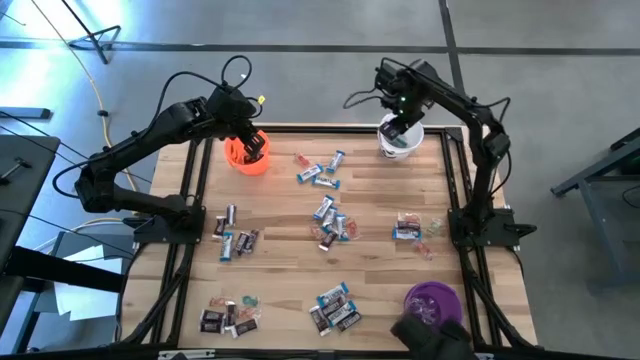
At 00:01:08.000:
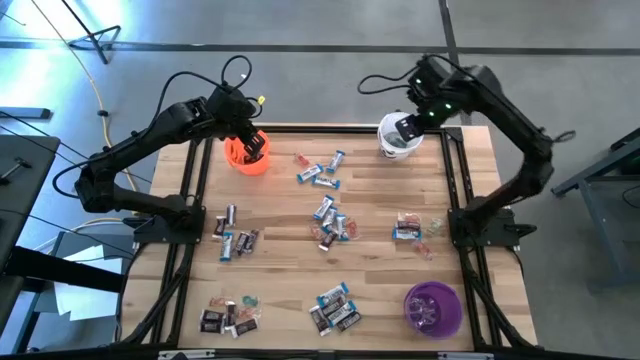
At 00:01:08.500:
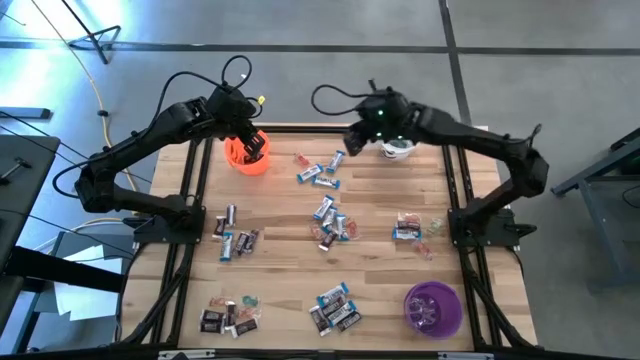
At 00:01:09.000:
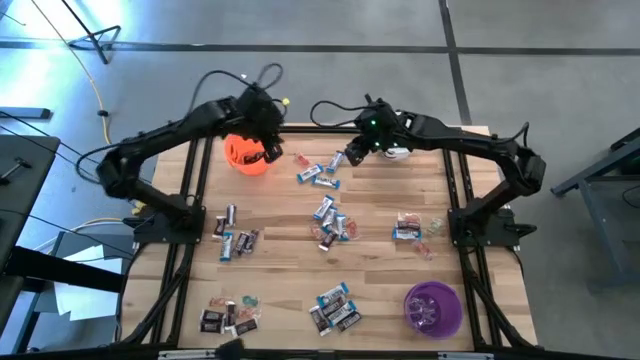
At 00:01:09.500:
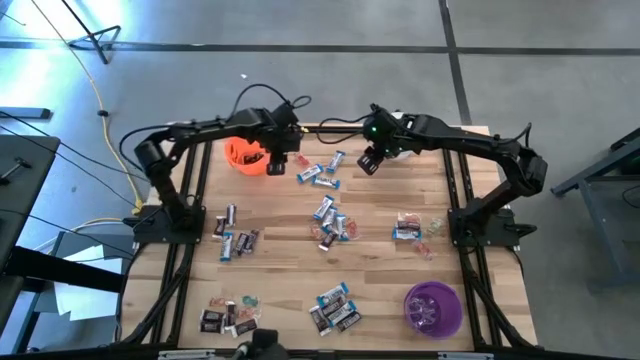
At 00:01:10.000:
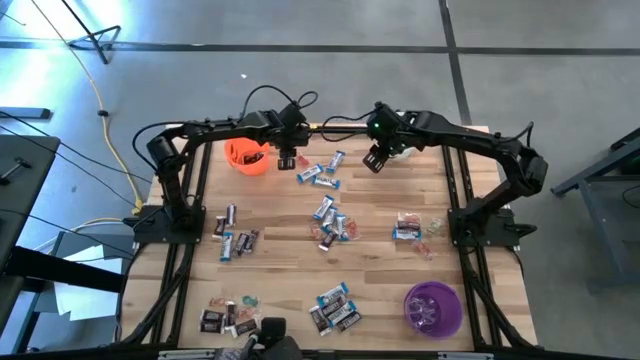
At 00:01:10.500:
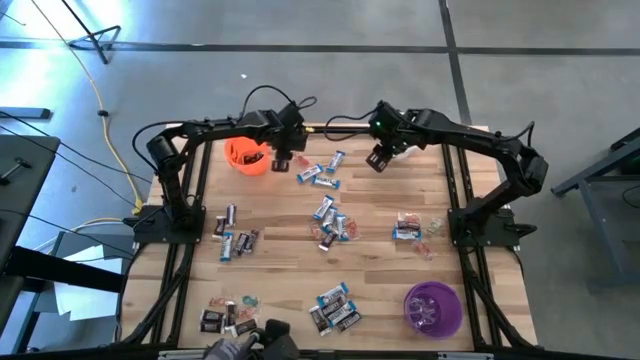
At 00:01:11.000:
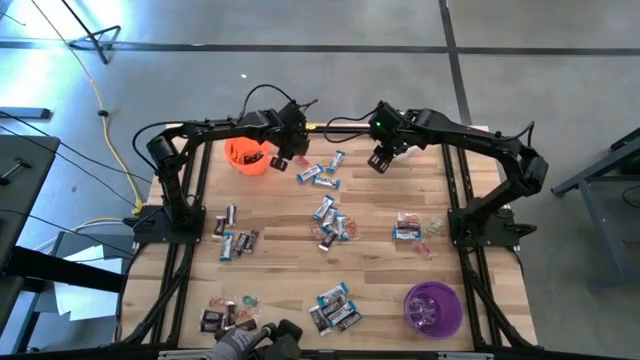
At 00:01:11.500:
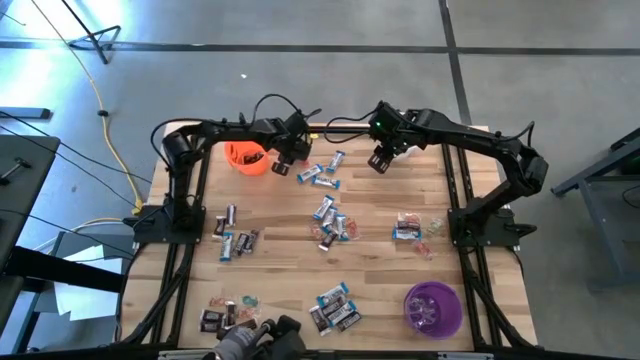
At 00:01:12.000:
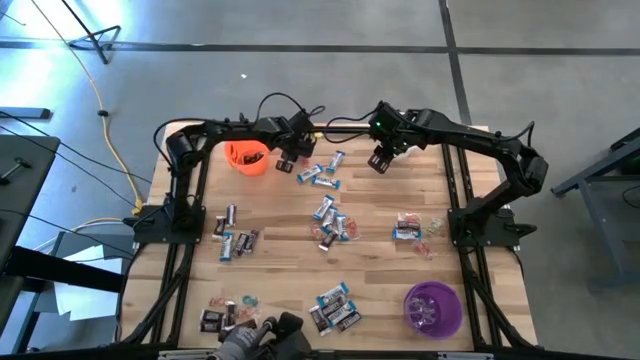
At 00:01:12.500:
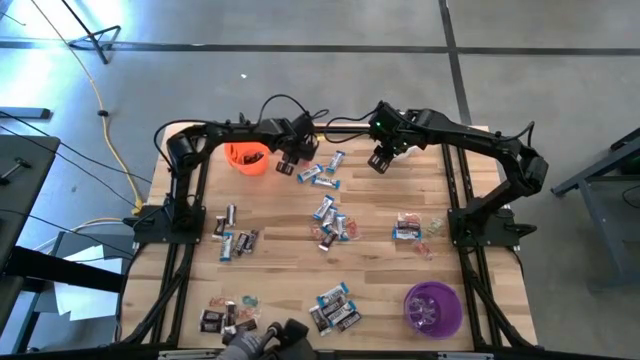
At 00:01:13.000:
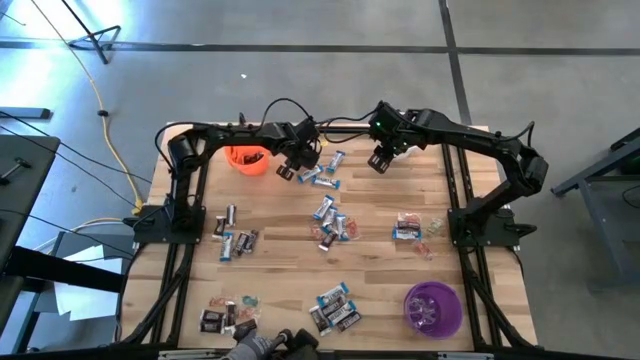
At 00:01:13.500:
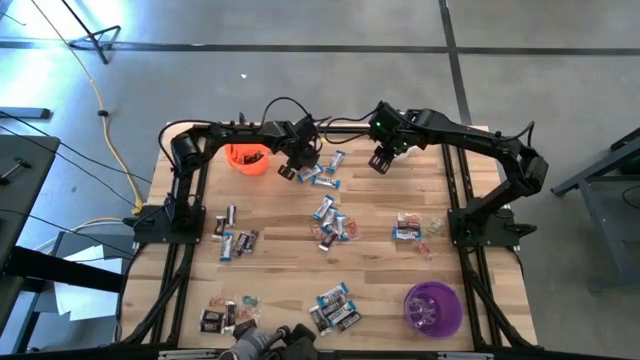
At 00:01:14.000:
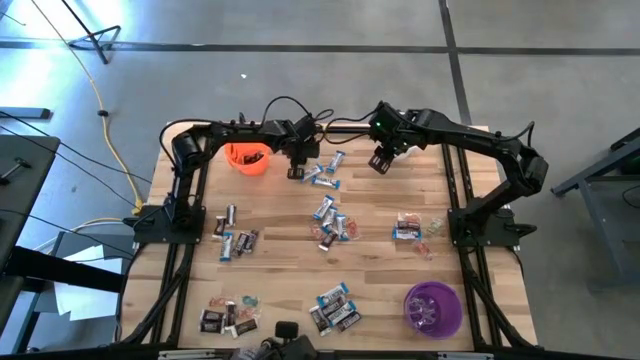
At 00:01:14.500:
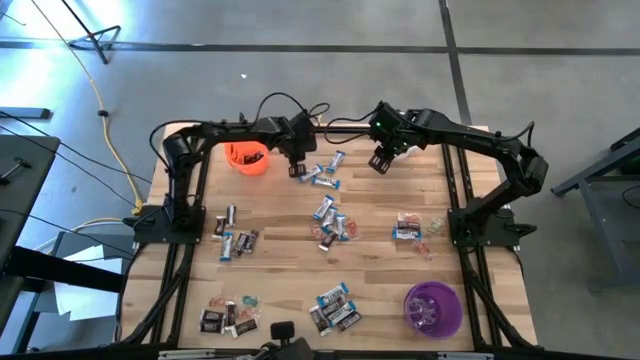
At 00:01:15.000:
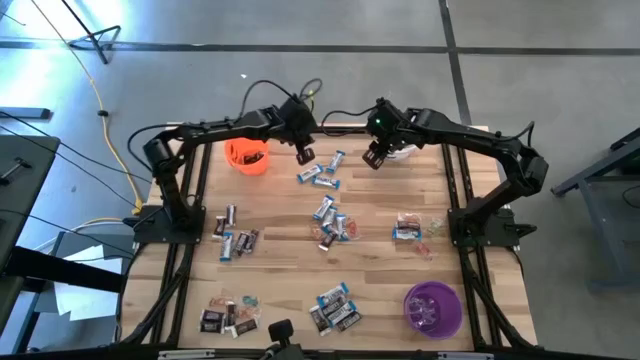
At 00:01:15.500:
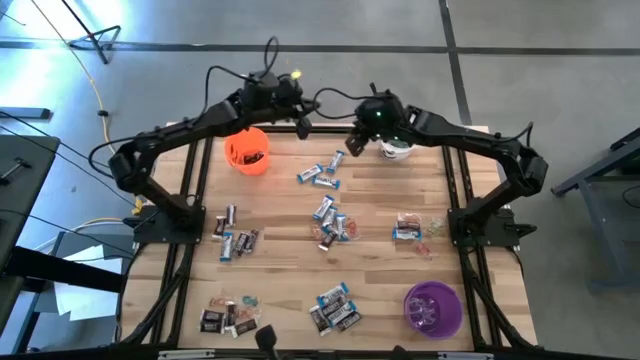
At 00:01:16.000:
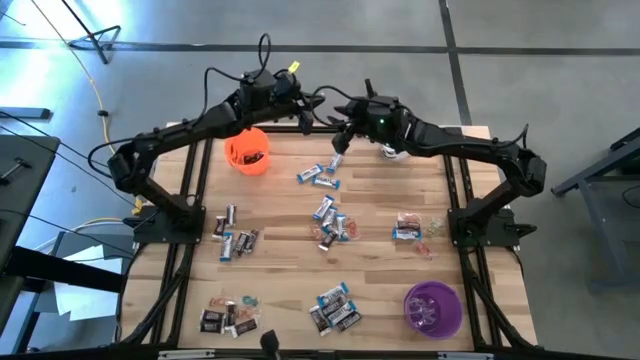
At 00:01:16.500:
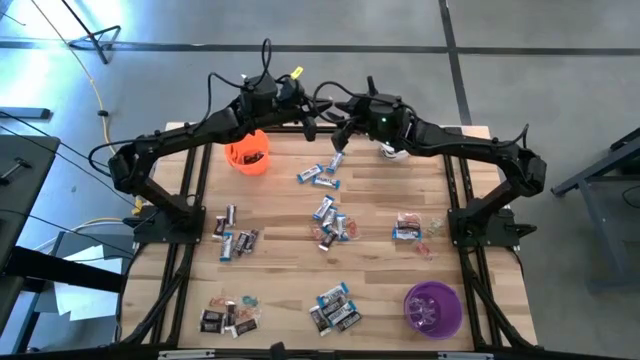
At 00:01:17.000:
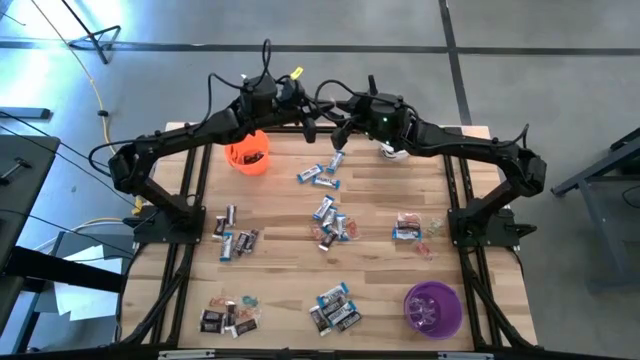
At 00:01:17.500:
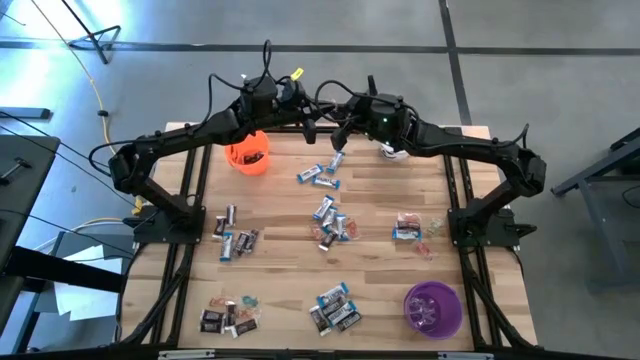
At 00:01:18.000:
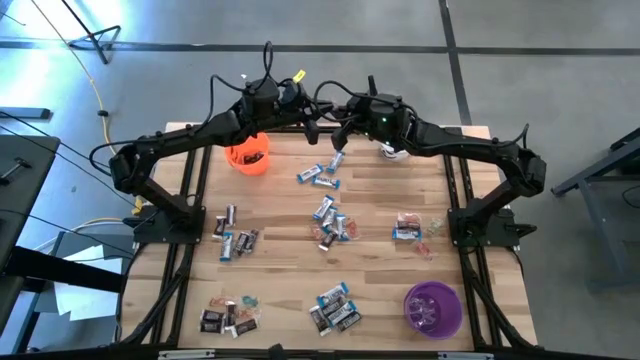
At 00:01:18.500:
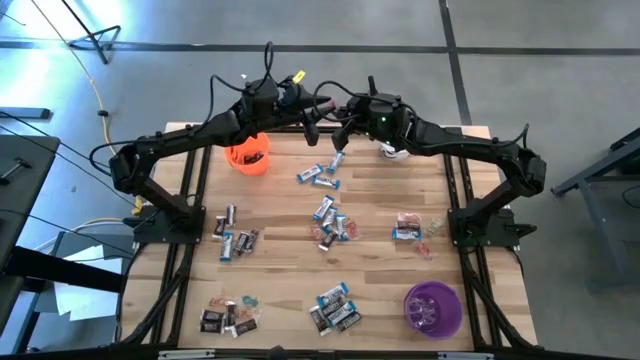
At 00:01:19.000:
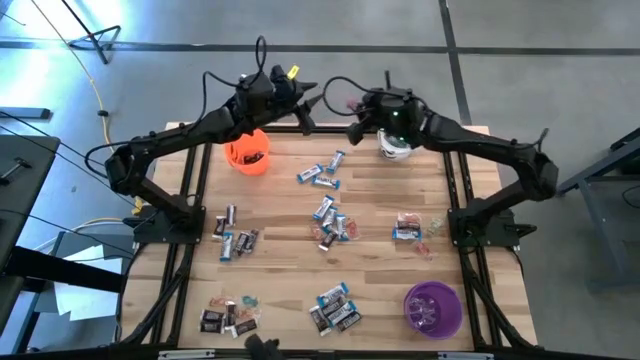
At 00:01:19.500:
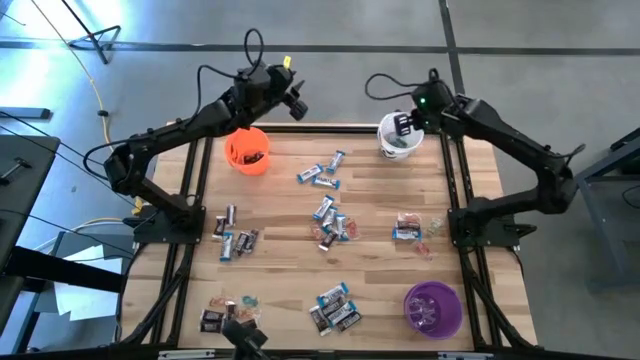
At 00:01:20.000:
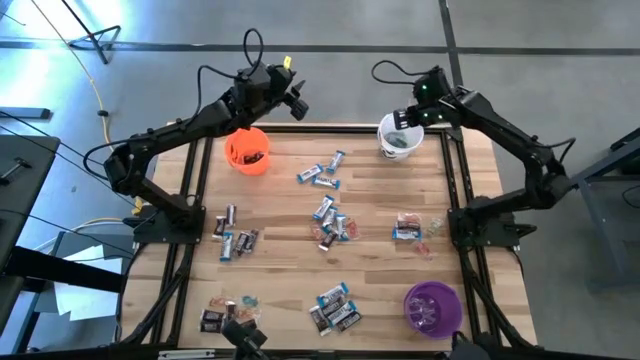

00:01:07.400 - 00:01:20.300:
Task: Sort candy
Put the red gummy into the white bucket

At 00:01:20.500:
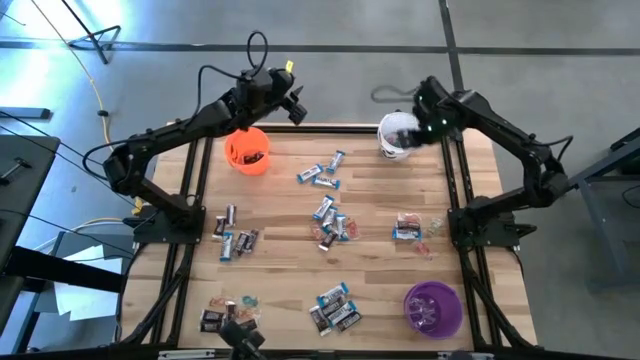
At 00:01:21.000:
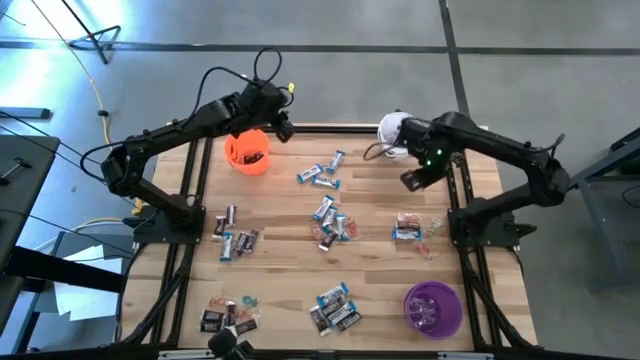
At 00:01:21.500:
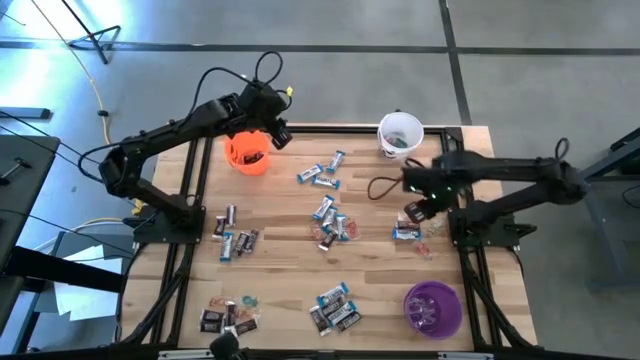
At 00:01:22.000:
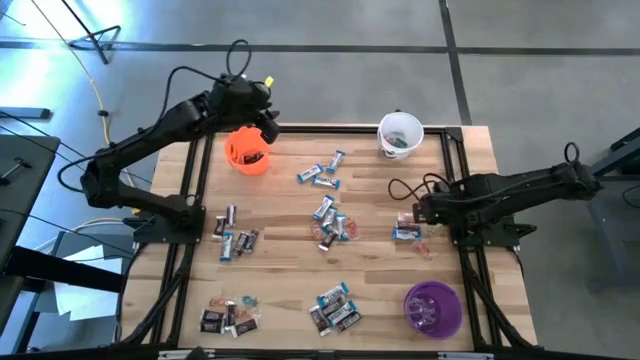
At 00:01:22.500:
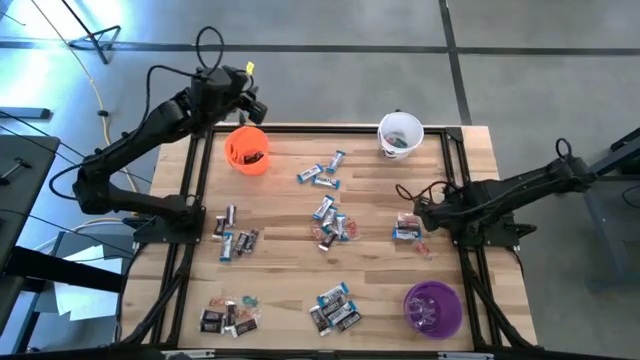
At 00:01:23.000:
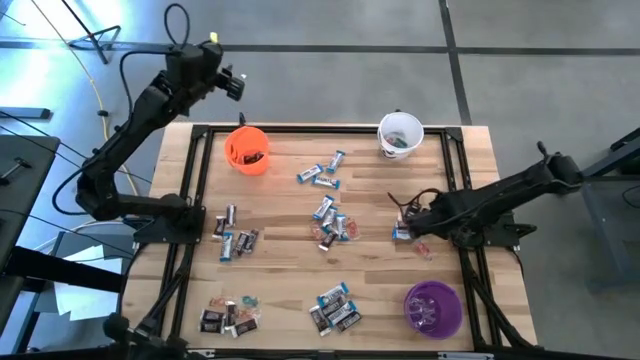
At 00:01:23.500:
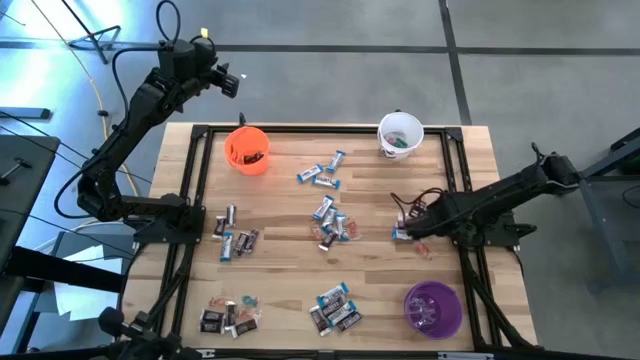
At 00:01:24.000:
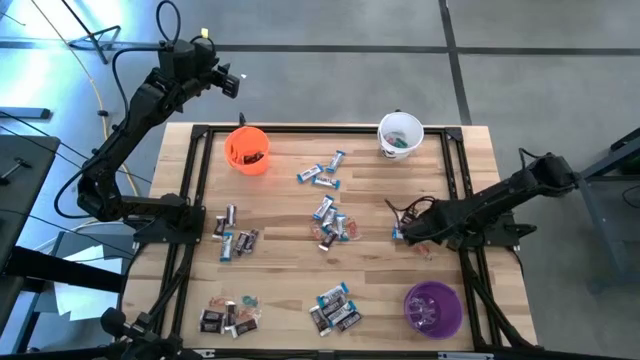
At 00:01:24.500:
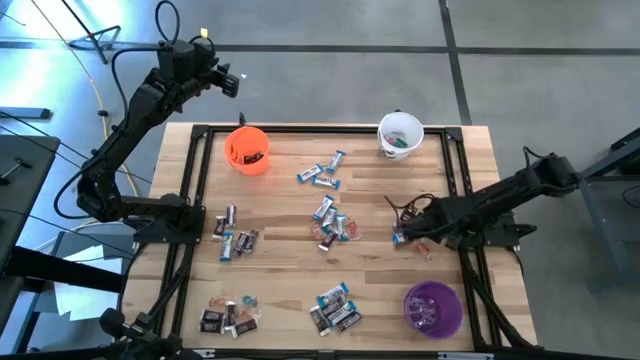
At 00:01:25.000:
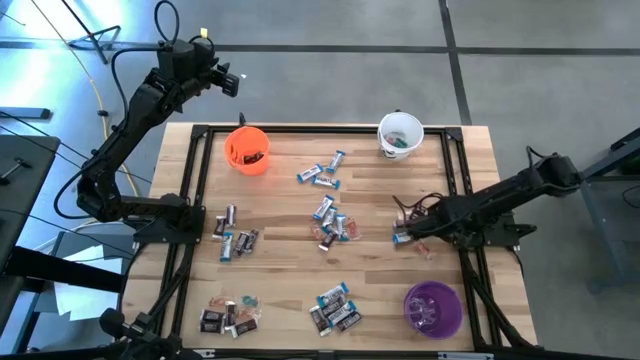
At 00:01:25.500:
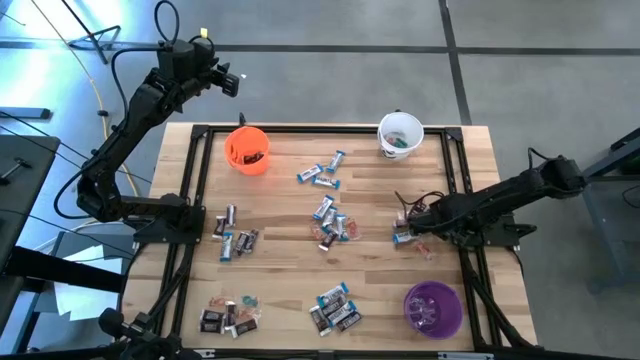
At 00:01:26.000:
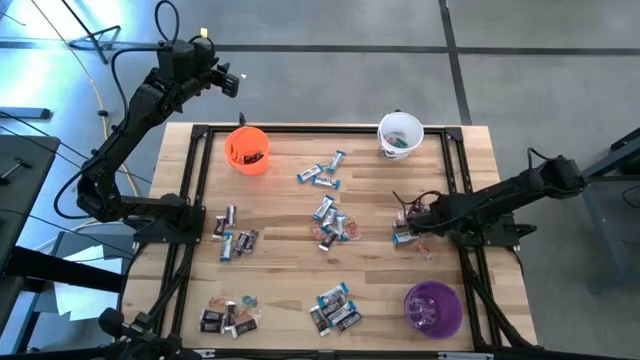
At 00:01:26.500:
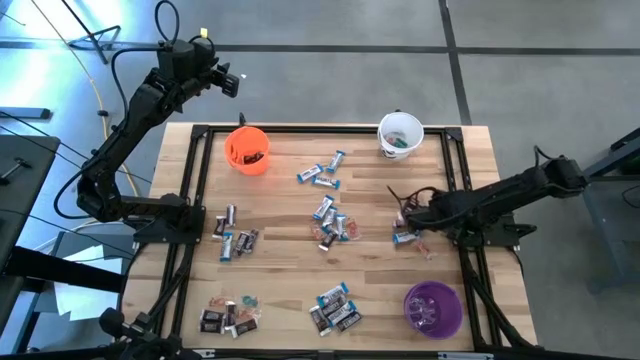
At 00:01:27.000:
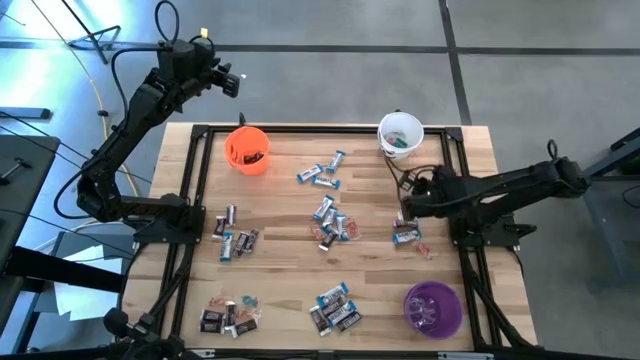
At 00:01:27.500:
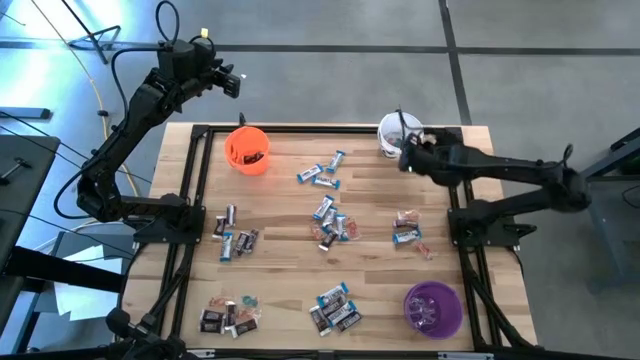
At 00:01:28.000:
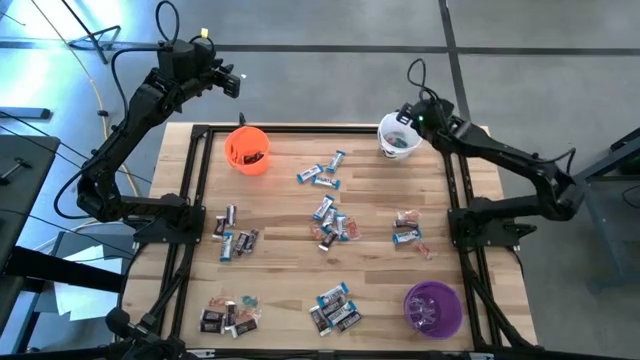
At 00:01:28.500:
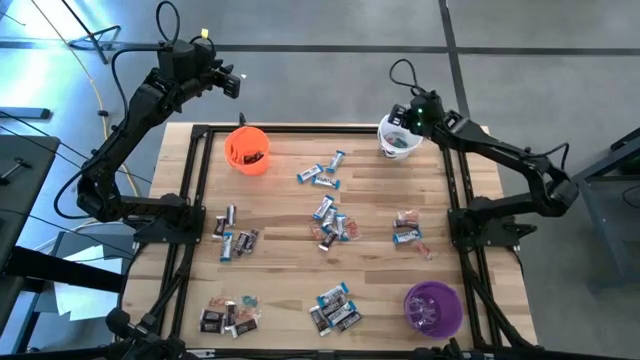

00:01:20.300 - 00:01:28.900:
Put the green gummy into the white bucket
